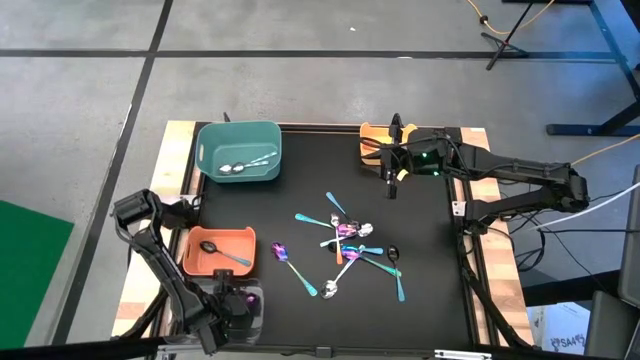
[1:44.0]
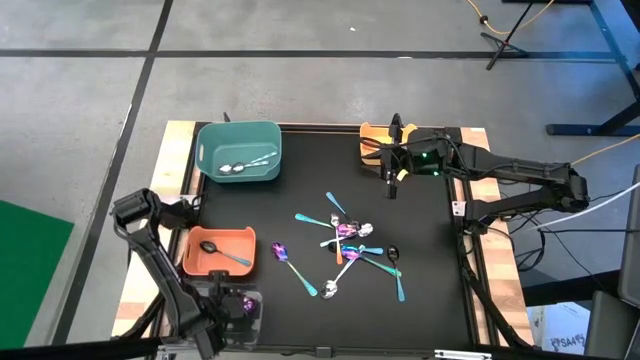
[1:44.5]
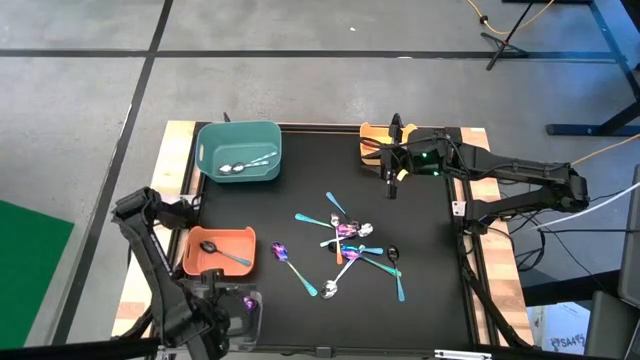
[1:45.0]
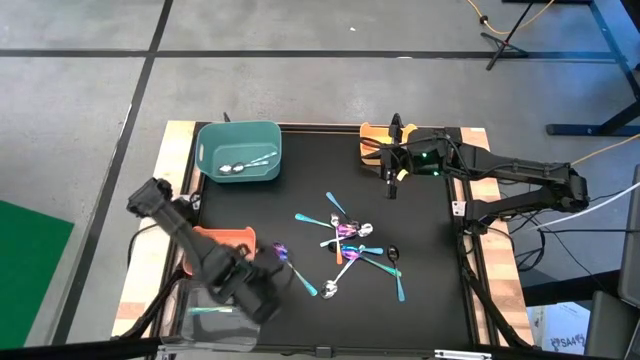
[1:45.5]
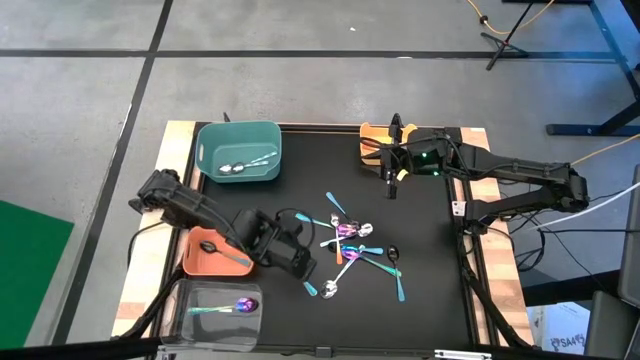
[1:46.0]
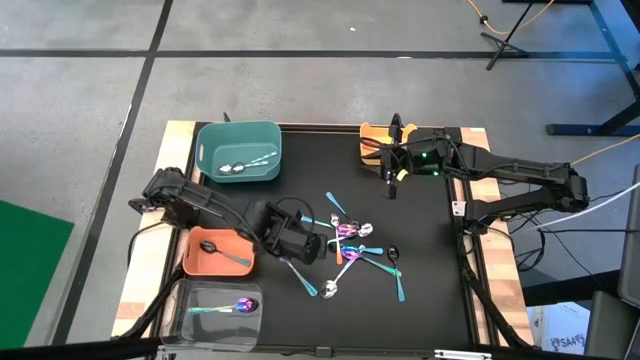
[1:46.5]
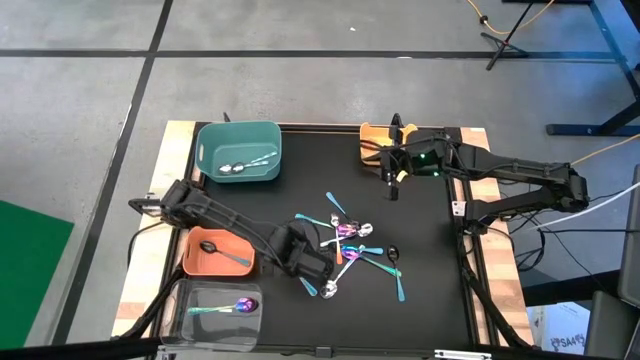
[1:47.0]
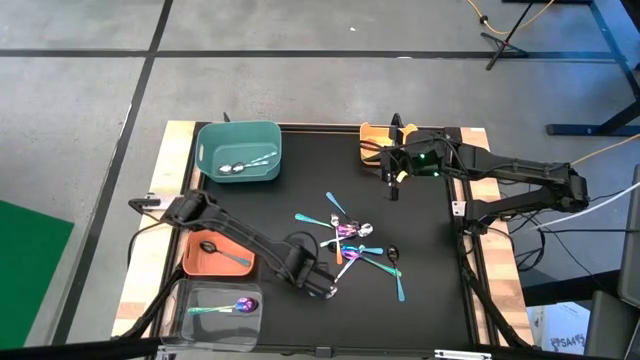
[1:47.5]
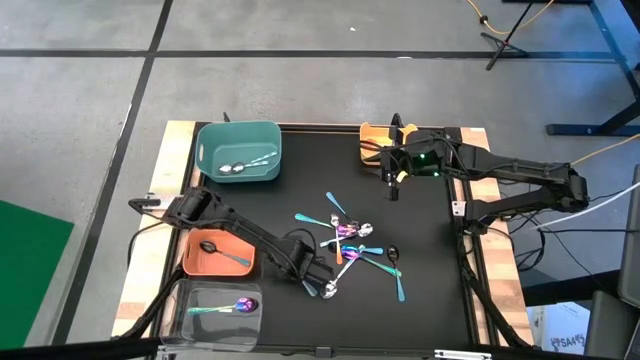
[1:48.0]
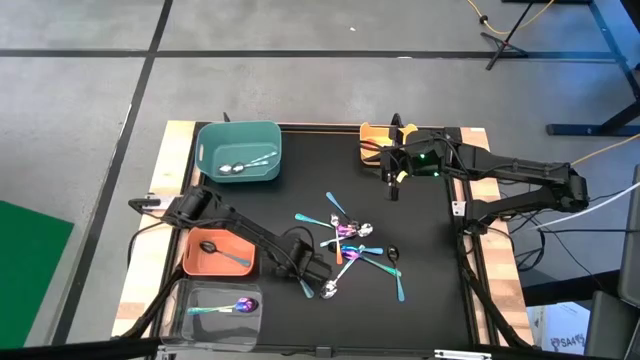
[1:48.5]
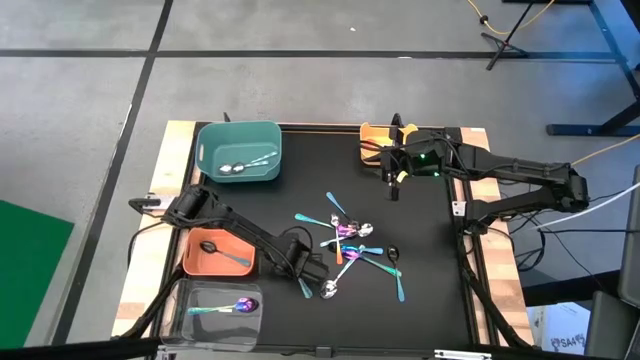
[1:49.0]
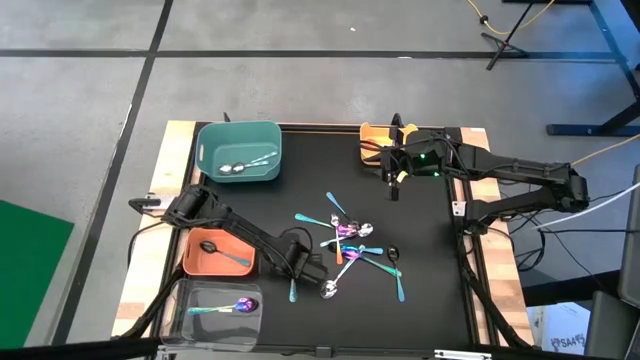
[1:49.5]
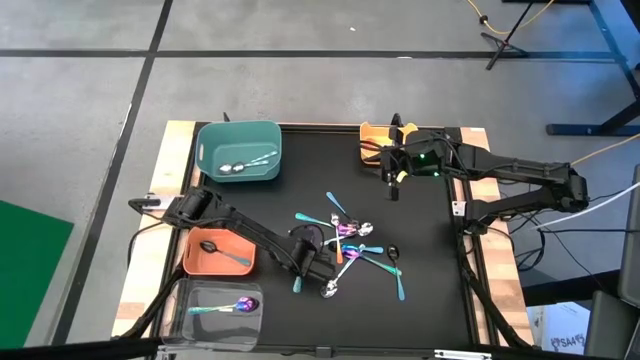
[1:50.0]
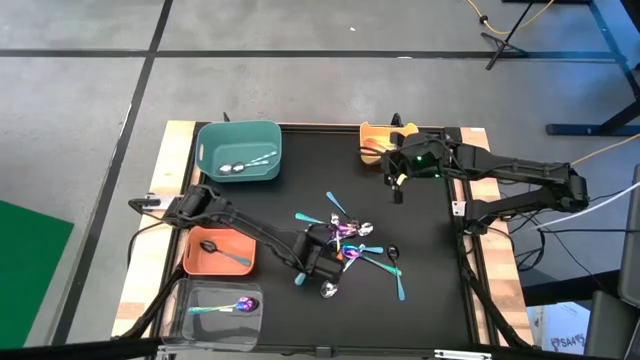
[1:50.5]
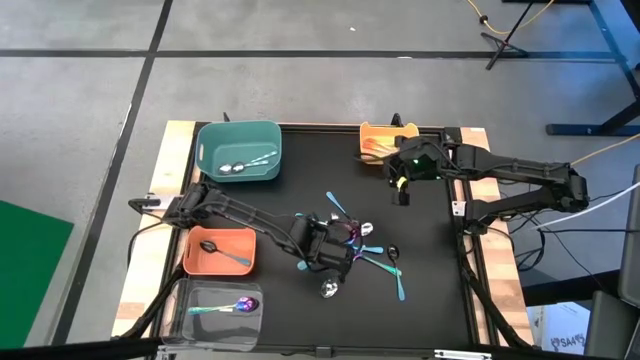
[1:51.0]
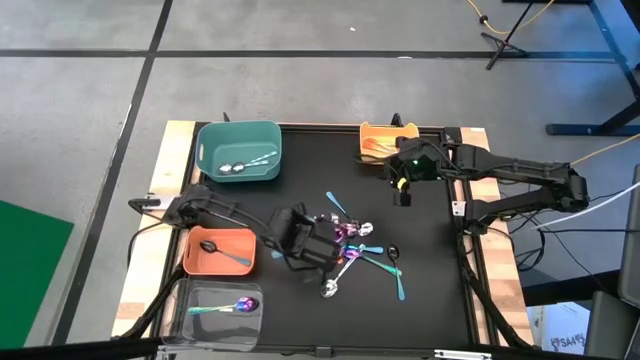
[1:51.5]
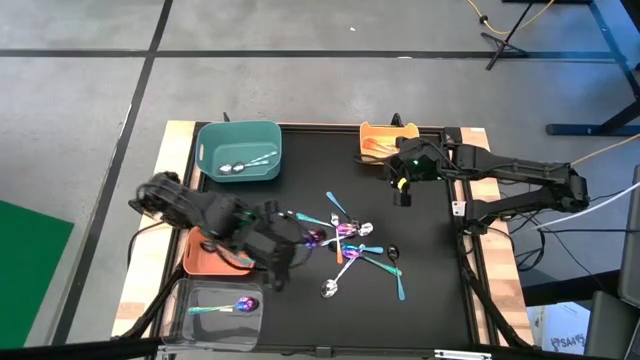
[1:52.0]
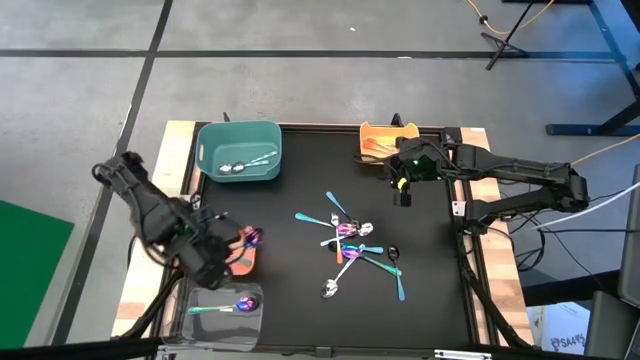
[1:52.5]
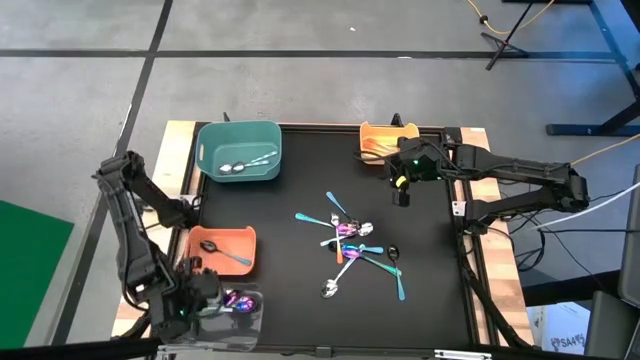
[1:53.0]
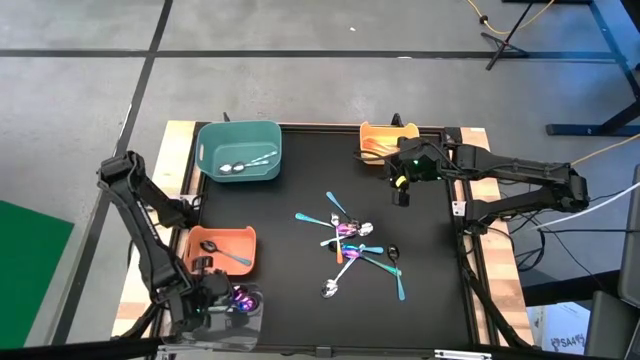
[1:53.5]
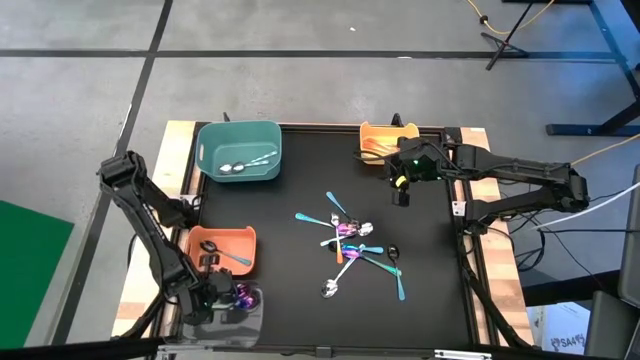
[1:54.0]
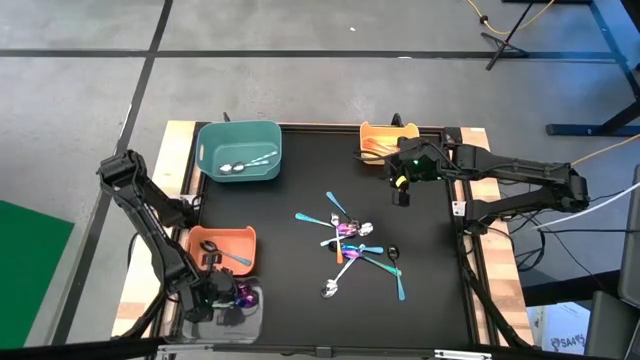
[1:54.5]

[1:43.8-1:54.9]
Task: Sort silverware by color (type)
Put the violet spoon into the transparent bin

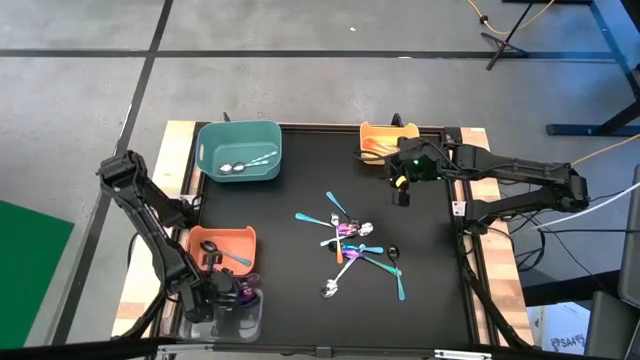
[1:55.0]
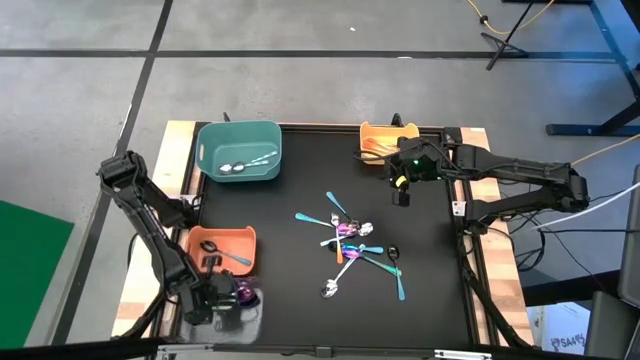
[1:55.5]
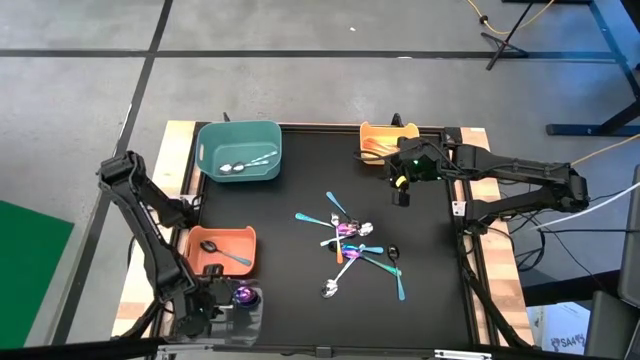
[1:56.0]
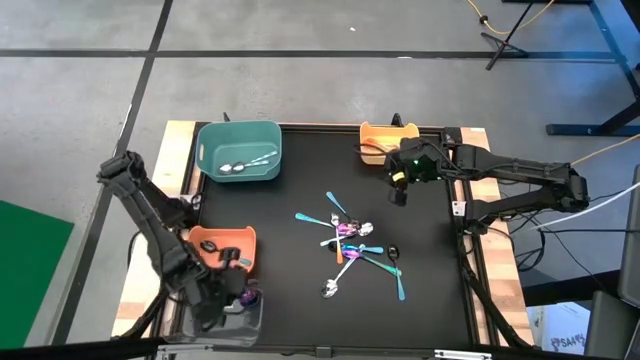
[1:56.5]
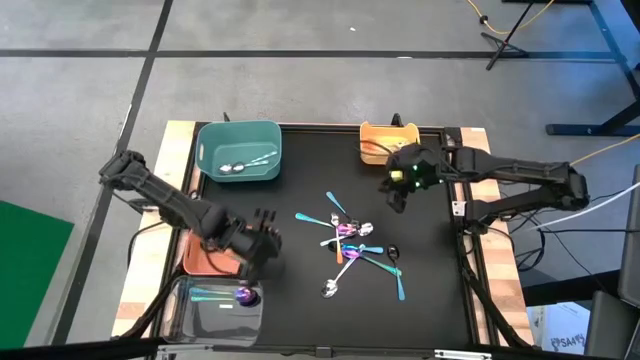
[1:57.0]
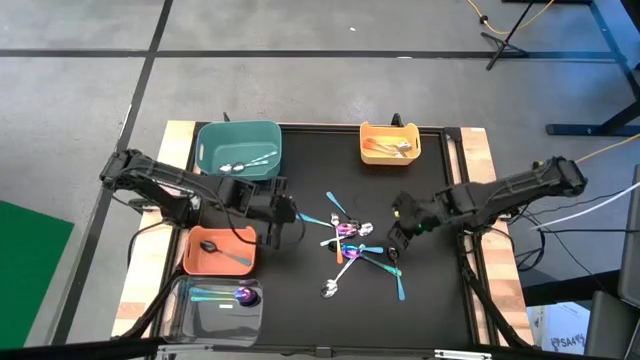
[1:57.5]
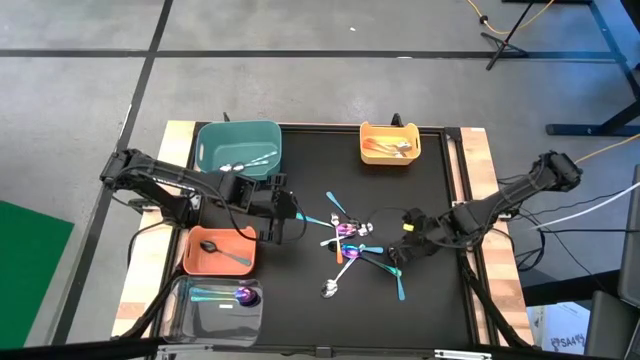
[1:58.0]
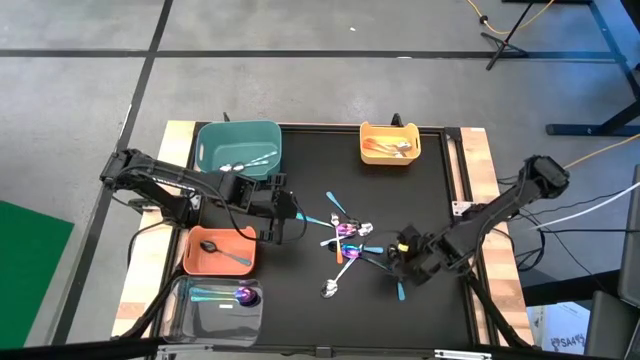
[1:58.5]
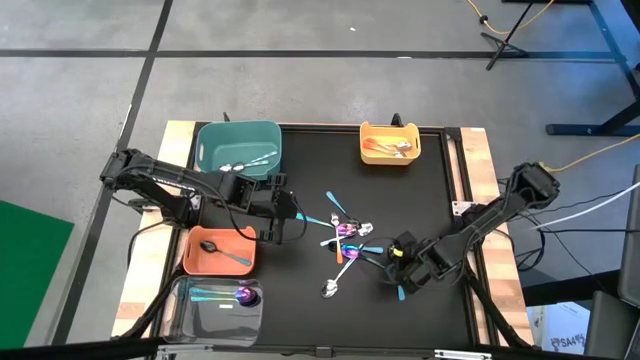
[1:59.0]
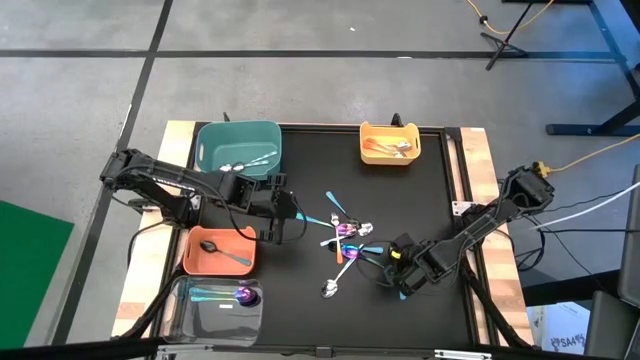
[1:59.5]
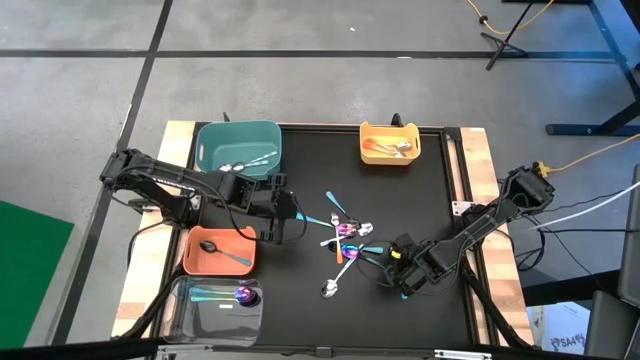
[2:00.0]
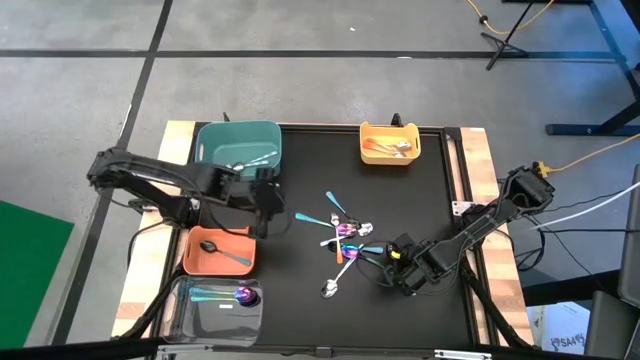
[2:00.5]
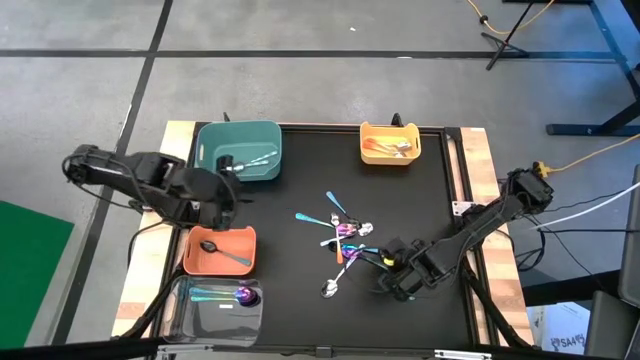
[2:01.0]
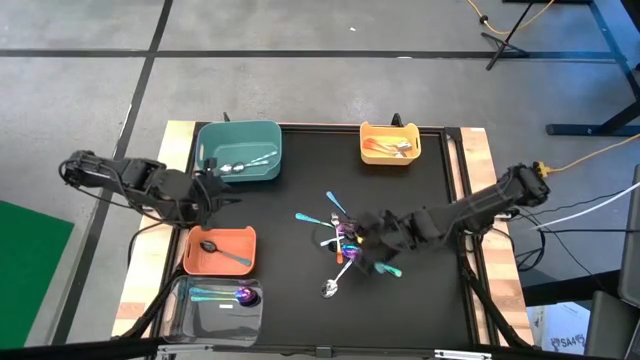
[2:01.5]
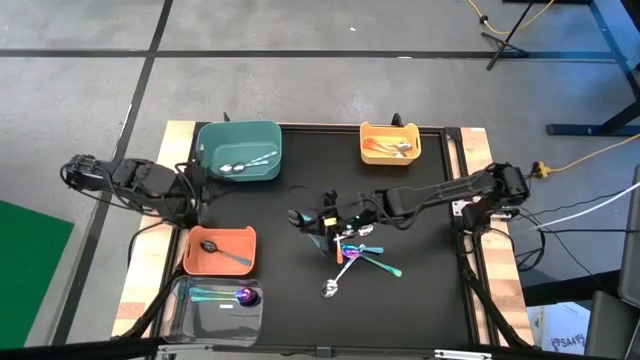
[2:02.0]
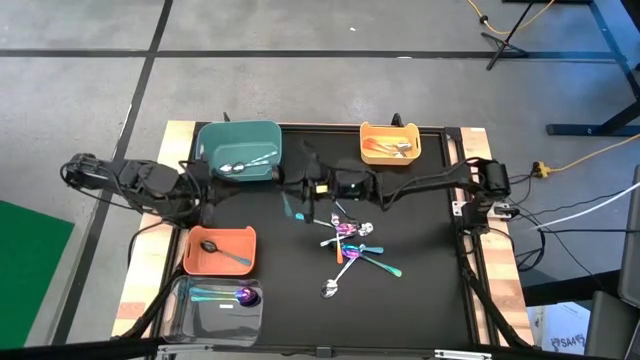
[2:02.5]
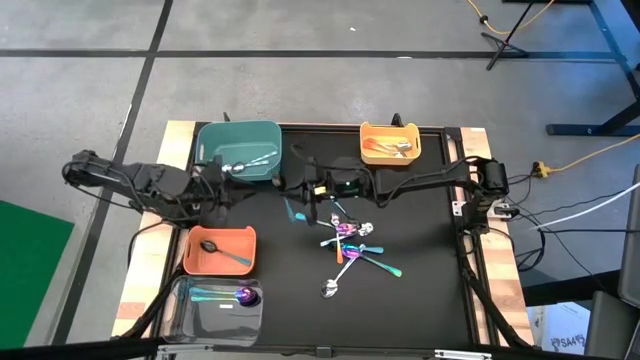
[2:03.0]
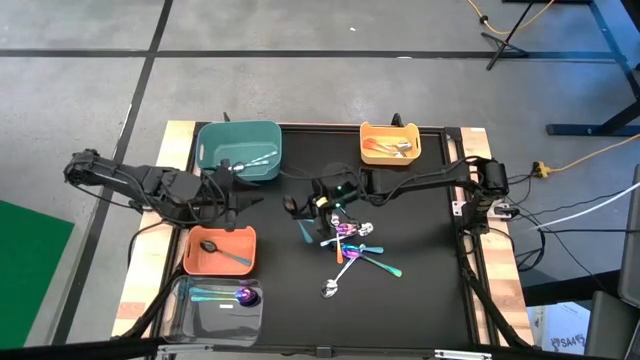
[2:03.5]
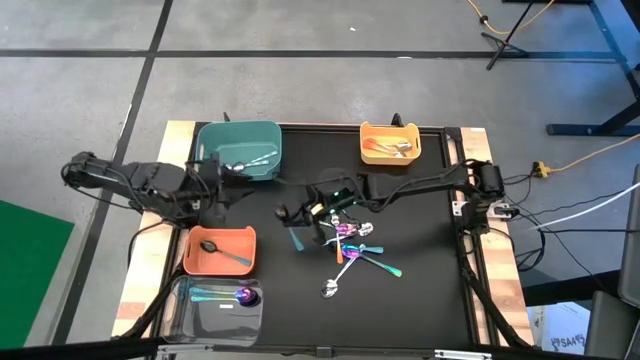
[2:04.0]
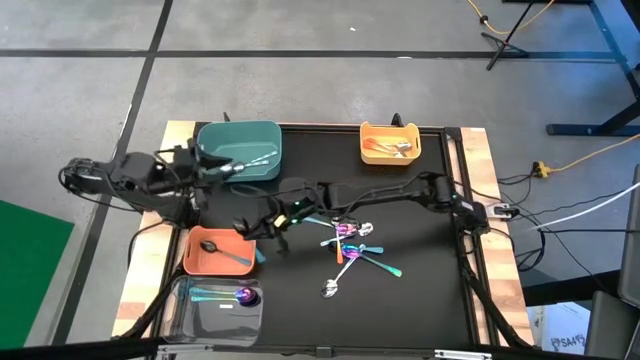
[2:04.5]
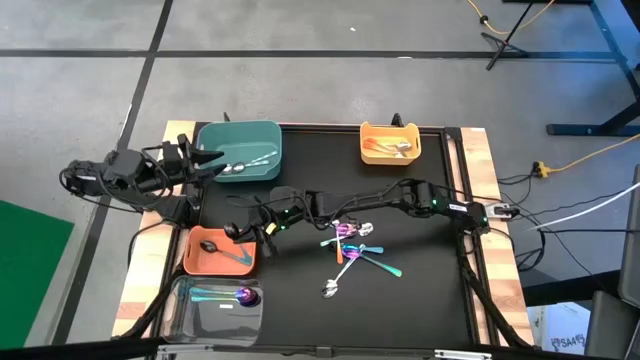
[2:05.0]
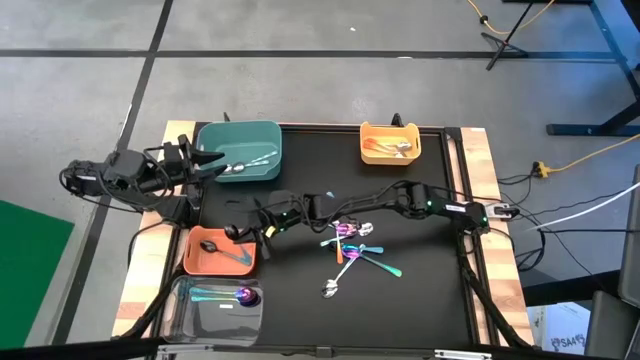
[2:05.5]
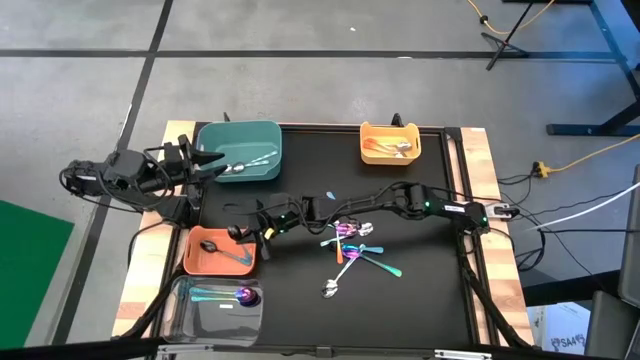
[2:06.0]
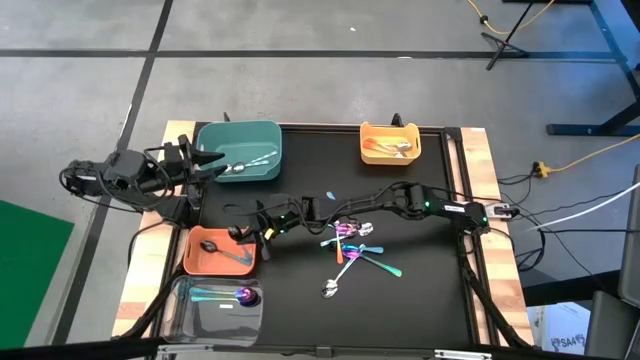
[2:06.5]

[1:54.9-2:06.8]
Put the light blue spoon into the orange bin
